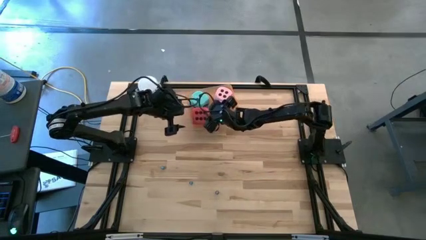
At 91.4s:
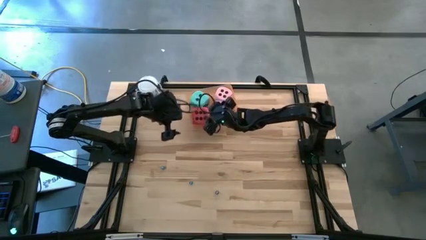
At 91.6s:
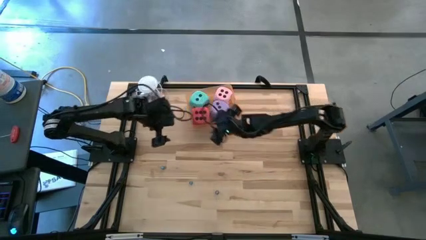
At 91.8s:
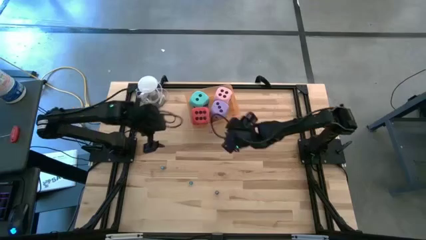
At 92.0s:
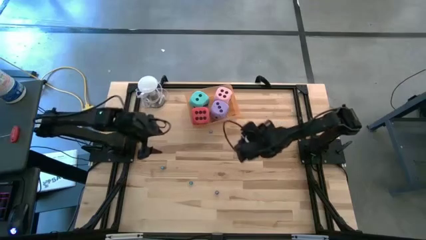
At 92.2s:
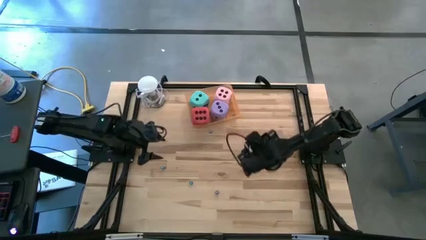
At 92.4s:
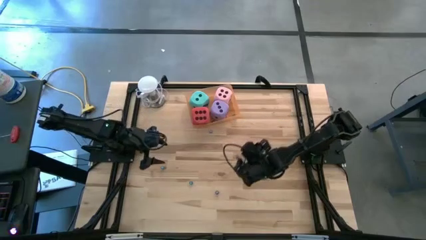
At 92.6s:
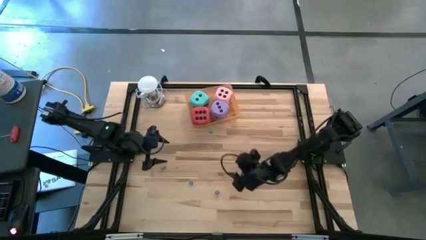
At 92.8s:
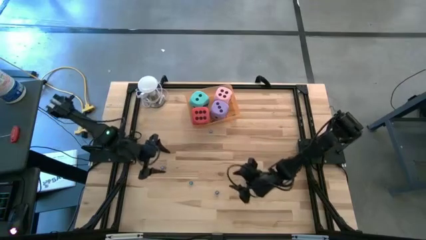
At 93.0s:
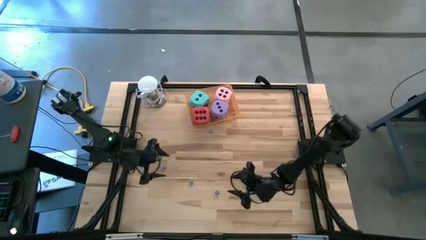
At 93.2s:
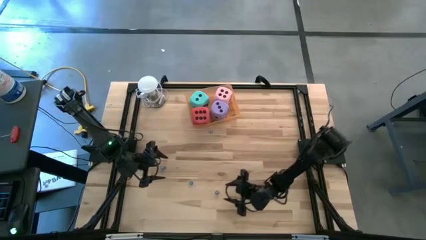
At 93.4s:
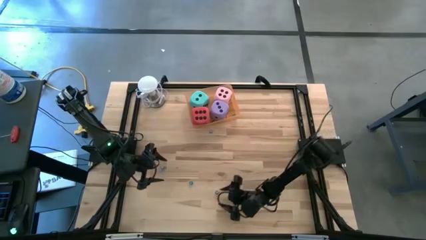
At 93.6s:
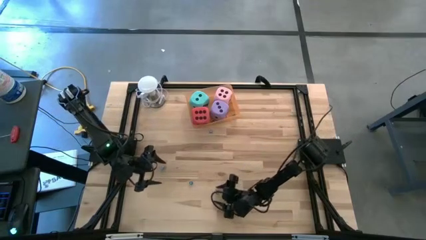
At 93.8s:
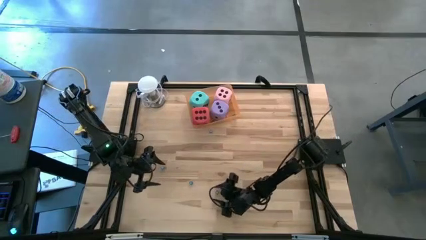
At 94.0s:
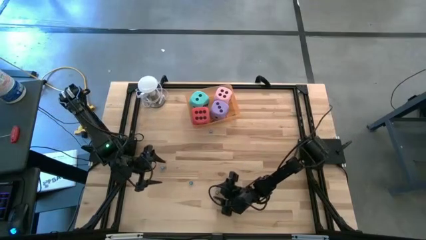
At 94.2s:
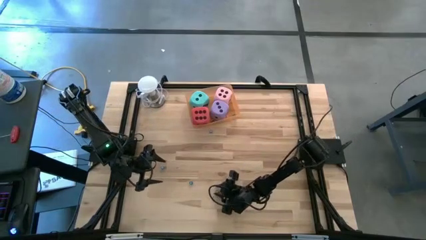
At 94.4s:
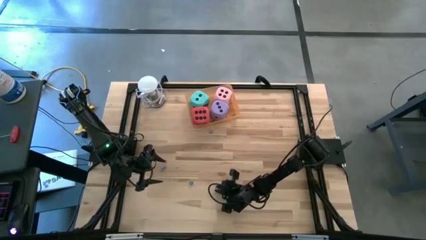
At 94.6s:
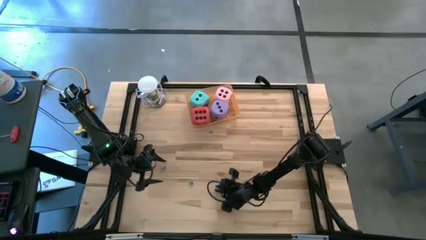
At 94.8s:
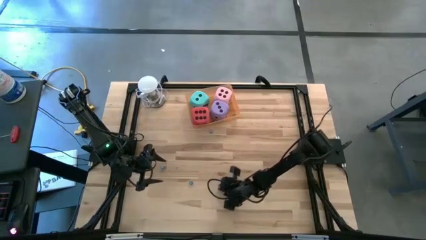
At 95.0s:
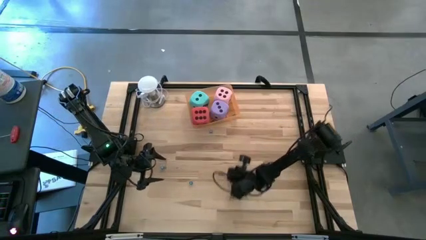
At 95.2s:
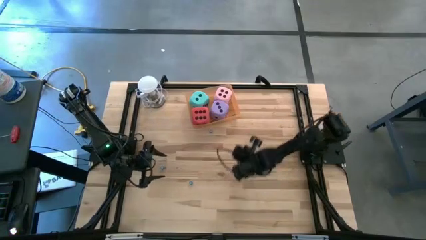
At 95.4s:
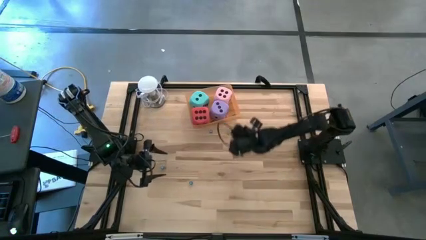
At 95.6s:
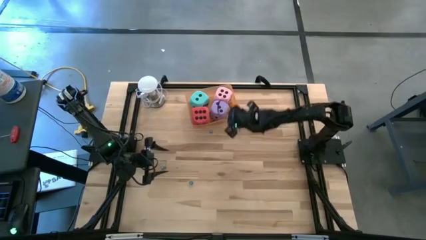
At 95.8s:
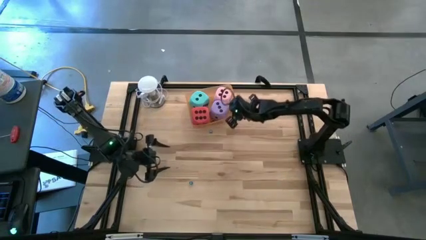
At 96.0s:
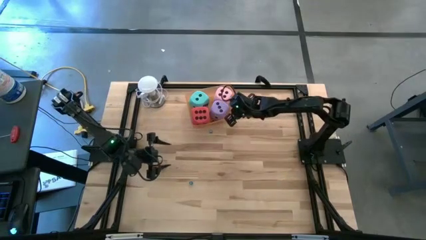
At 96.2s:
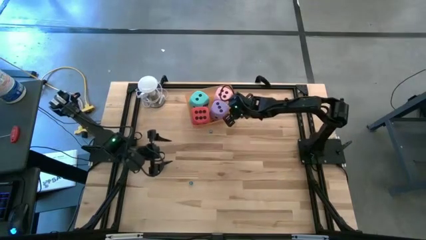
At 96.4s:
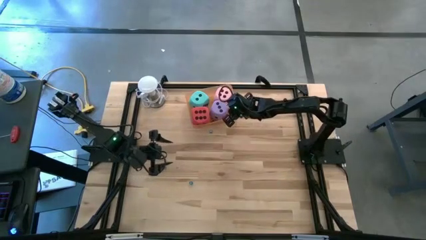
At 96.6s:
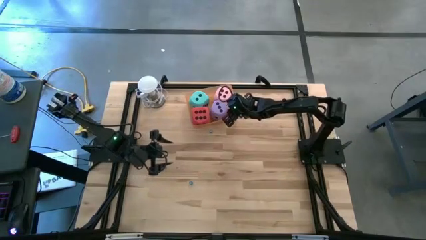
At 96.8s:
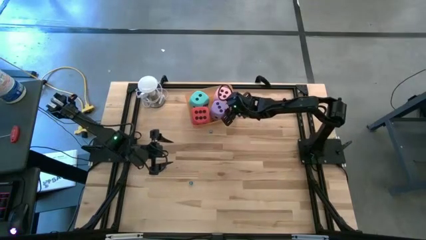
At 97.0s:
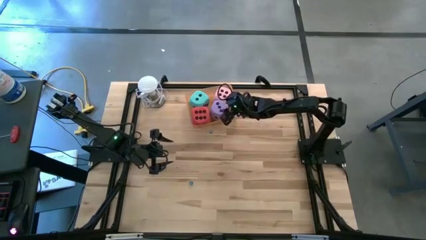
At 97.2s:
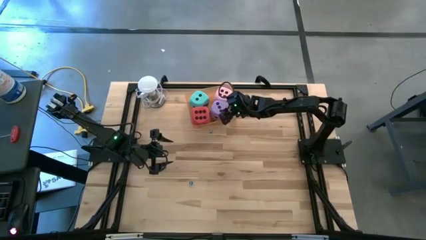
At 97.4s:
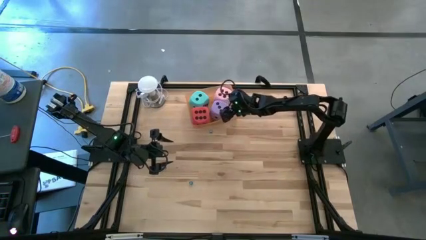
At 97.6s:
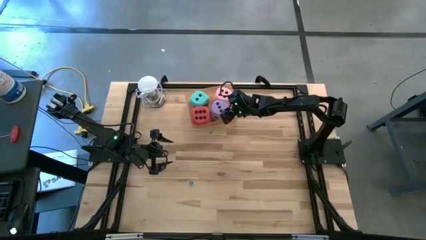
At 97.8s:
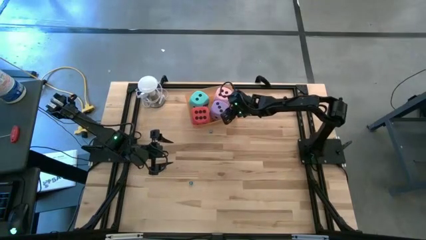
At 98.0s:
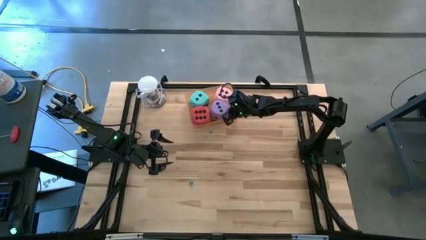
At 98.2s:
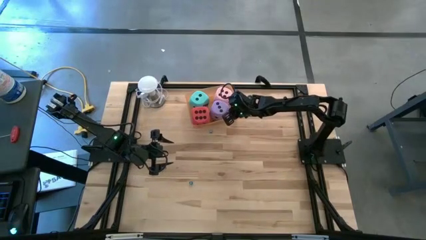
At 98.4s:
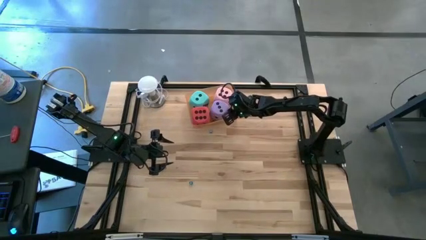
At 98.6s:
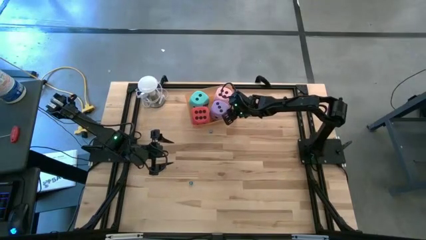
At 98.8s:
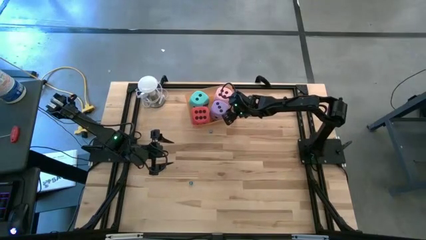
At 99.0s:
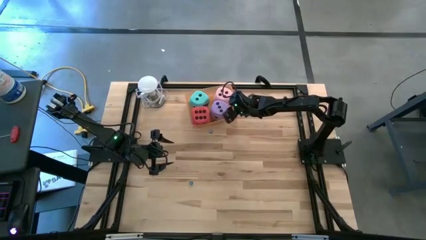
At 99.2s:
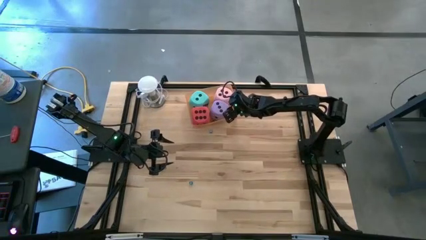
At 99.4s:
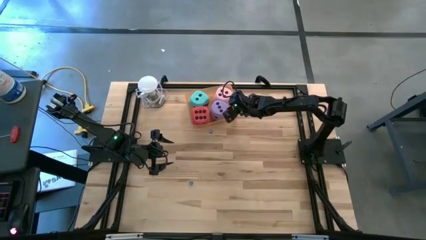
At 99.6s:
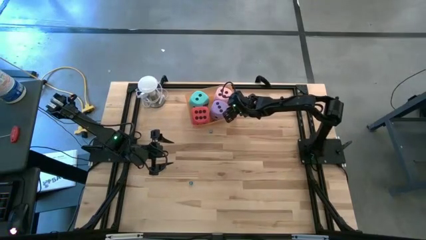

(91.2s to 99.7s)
Task: Pick & Place Dice
Put the blue die into the bin

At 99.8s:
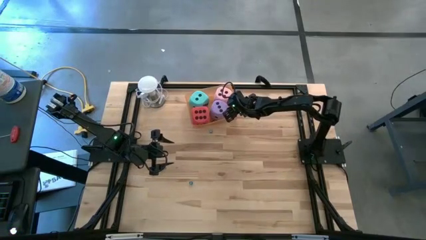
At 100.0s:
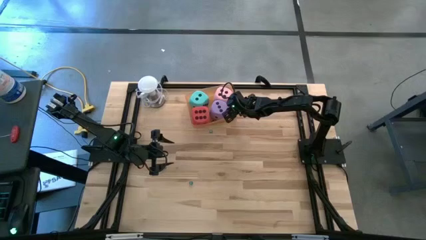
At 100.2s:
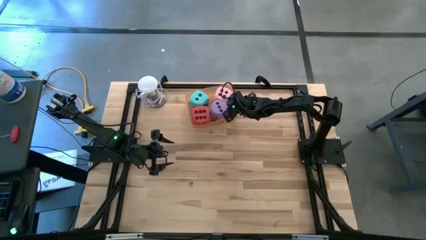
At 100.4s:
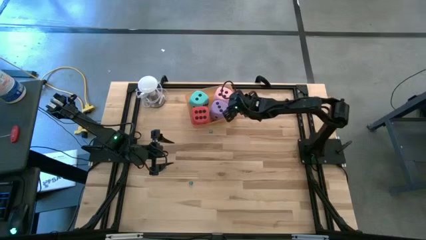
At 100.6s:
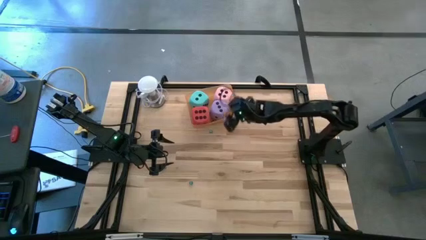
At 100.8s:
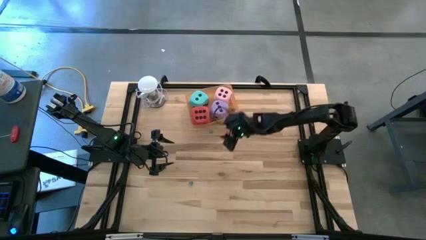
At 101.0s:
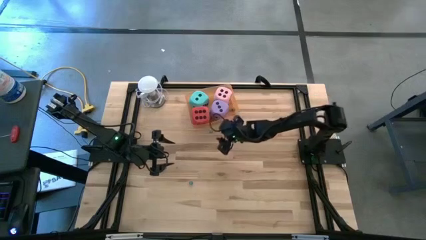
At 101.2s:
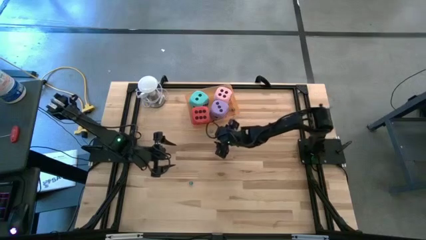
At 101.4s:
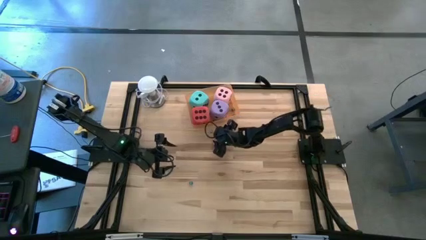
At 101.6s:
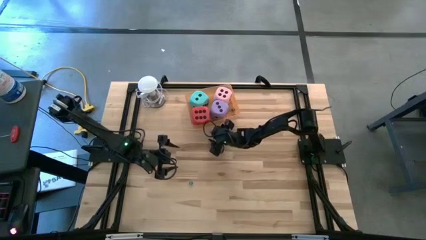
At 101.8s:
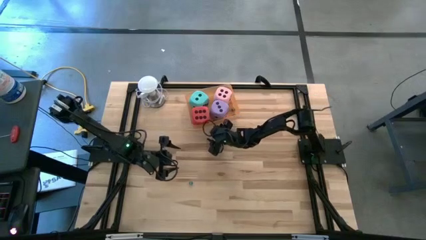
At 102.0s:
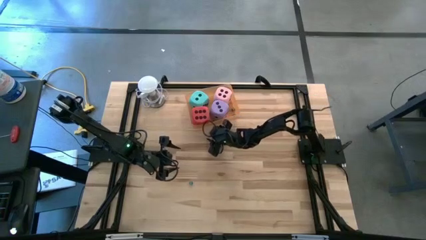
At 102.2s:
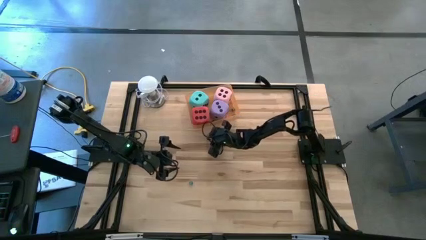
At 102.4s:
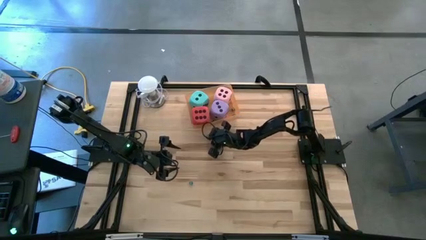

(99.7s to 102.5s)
Put the top light blue die into the bin

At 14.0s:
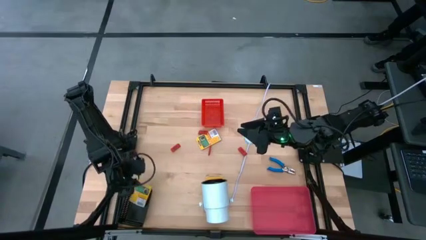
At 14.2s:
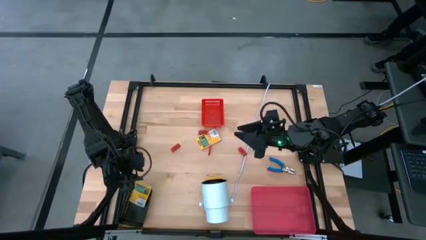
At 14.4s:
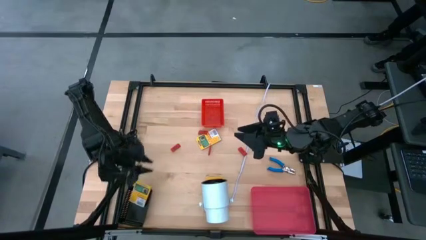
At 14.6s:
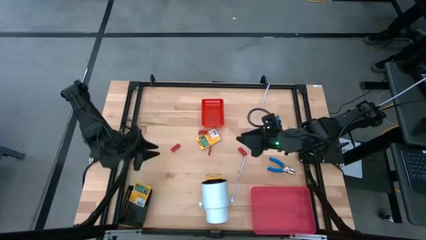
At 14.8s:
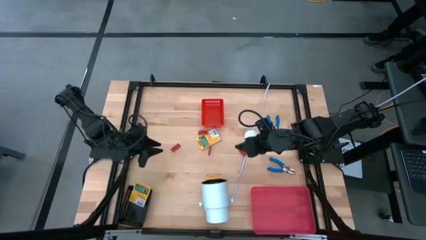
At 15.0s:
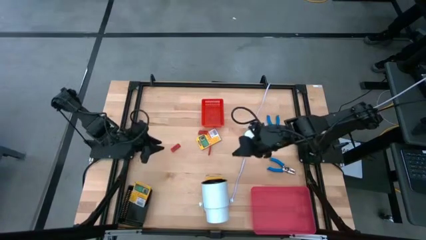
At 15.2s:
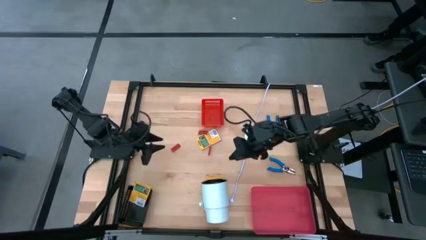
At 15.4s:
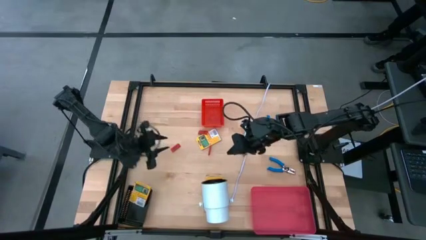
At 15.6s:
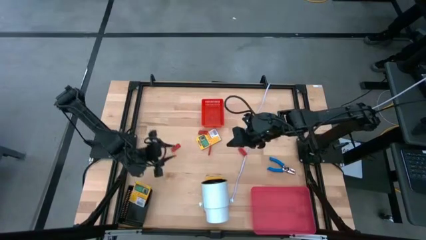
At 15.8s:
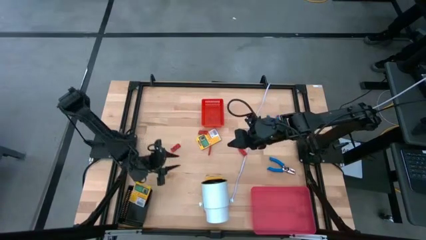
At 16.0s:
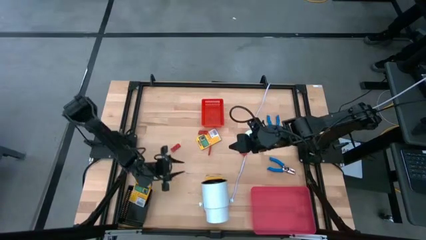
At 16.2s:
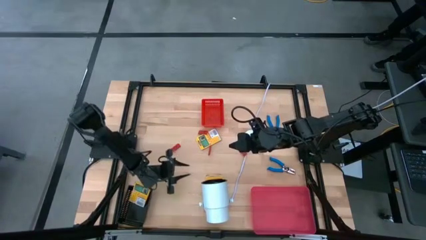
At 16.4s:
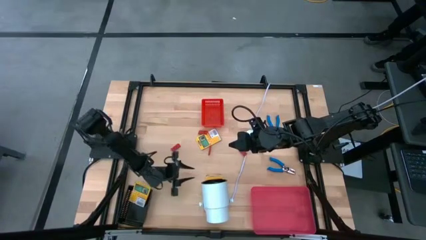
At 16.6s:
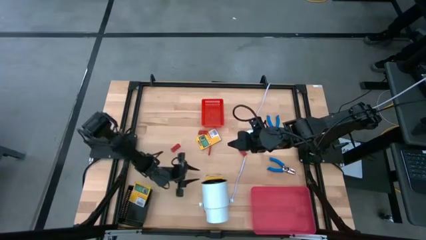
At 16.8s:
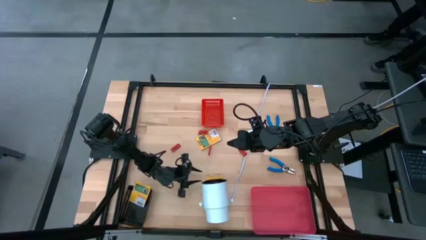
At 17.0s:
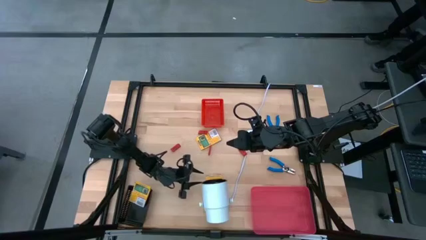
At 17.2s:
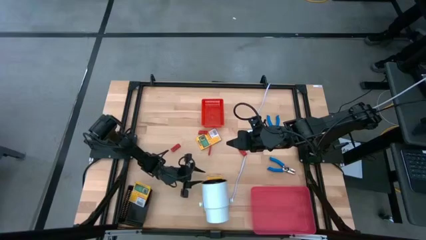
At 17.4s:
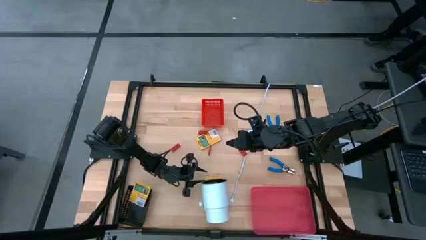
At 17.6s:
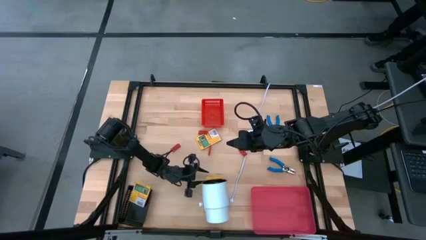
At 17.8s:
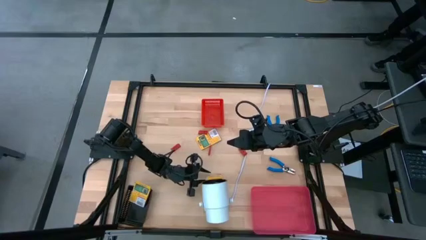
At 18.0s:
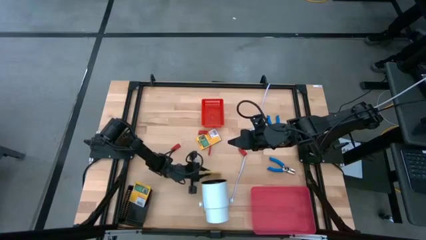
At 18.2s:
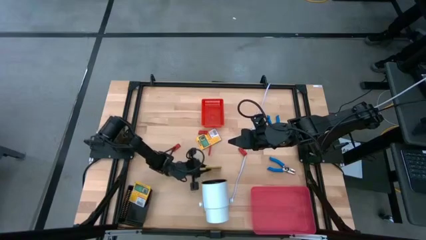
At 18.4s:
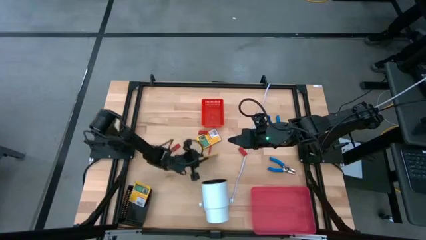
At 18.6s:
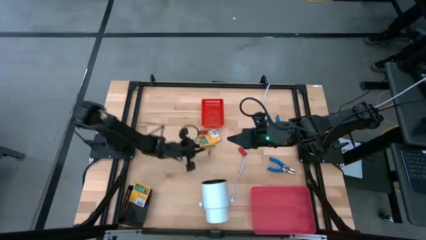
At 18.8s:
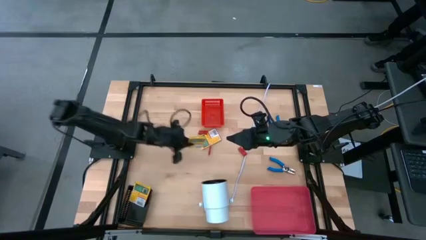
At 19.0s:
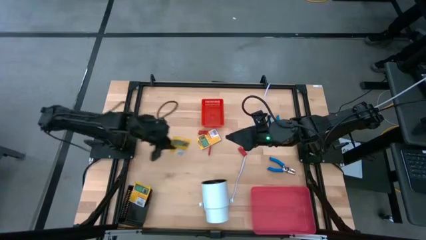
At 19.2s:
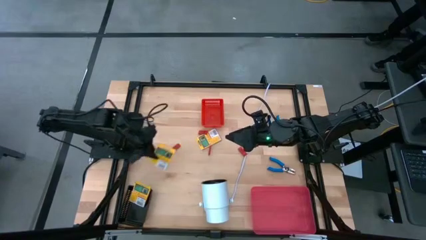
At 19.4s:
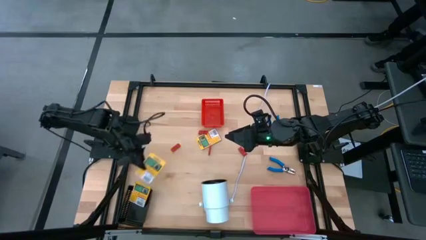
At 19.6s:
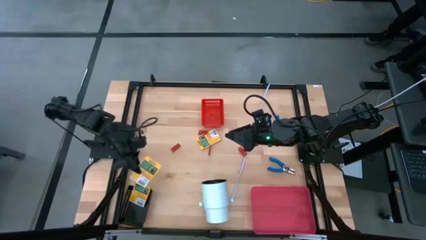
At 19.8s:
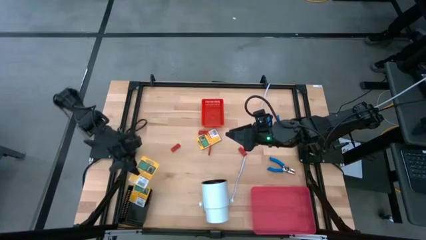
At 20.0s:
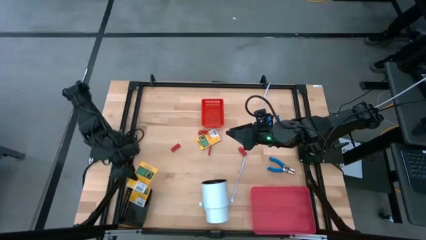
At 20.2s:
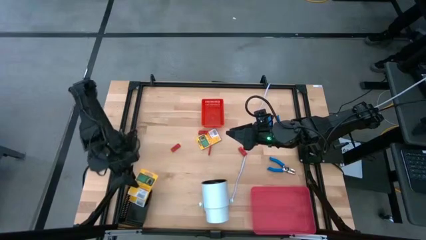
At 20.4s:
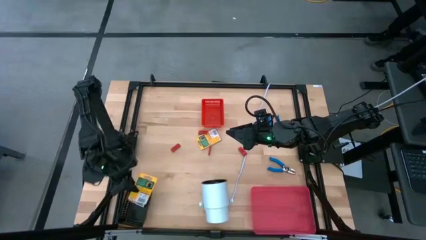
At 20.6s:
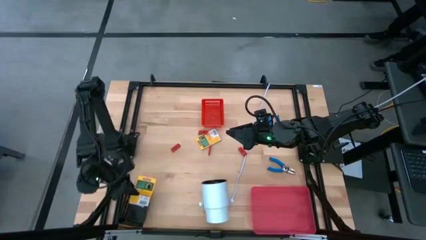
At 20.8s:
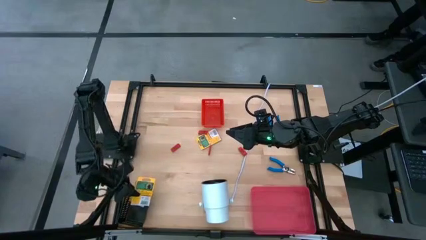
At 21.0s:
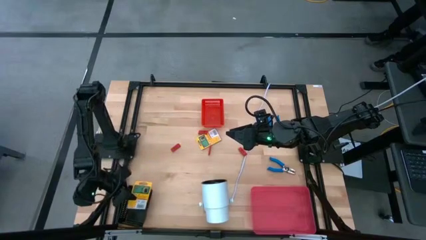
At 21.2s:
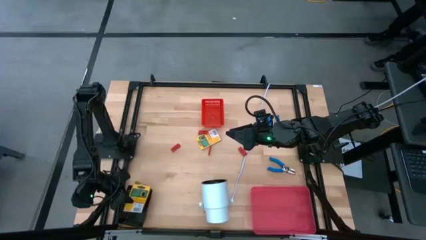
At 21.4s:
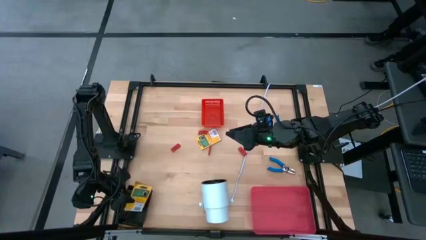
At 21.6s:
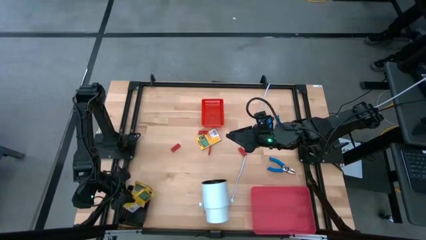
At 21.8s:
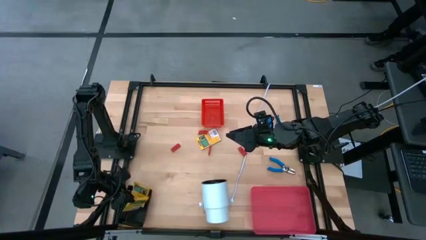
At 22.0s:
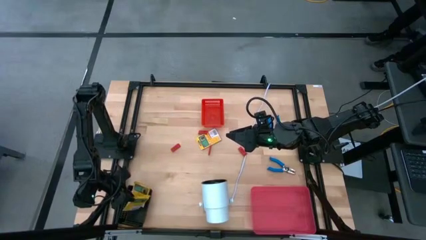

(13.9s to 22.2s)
Task: Pick & Place School Supplies
Put the yellow box crayon into the black bin
